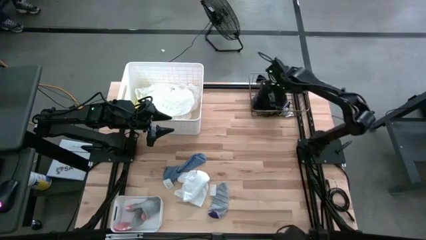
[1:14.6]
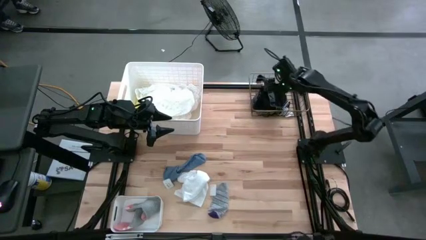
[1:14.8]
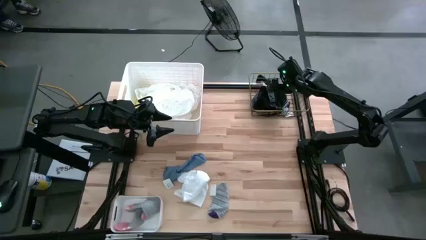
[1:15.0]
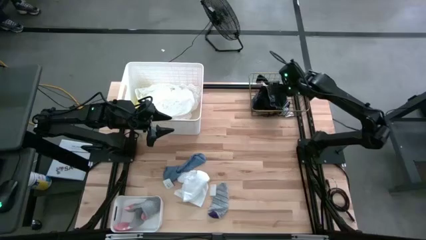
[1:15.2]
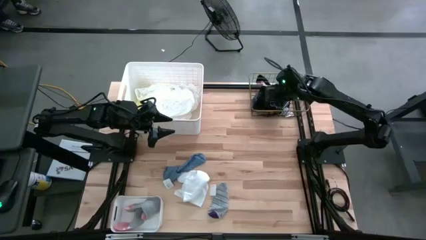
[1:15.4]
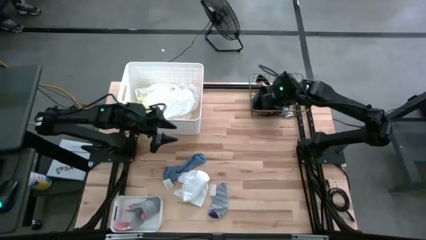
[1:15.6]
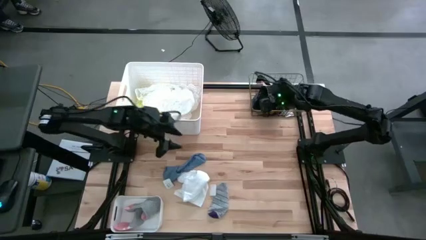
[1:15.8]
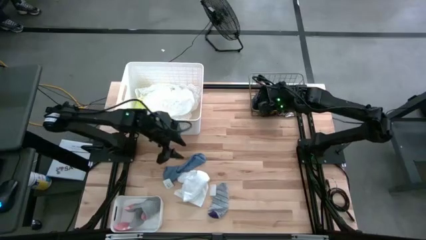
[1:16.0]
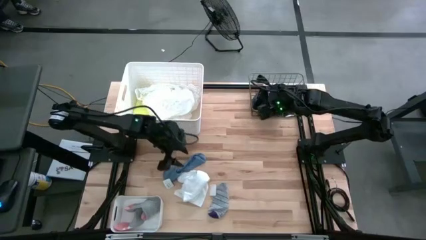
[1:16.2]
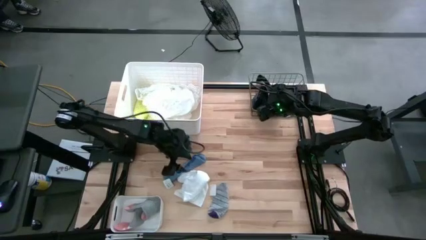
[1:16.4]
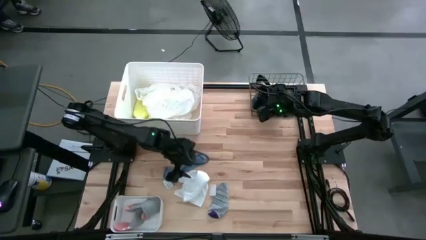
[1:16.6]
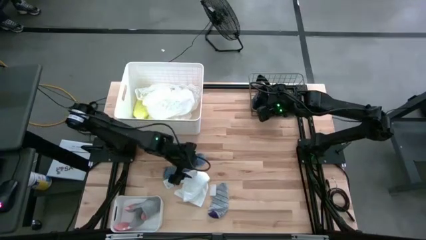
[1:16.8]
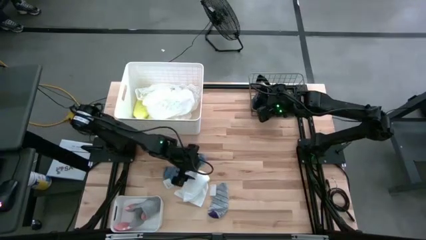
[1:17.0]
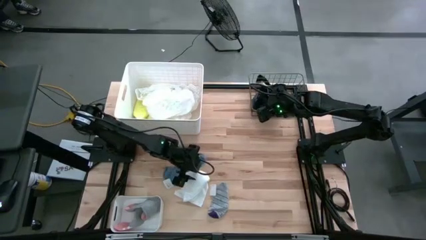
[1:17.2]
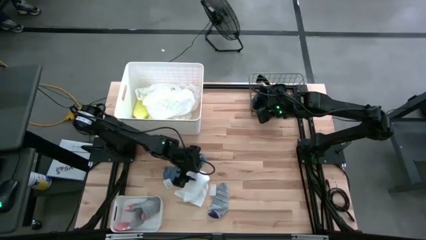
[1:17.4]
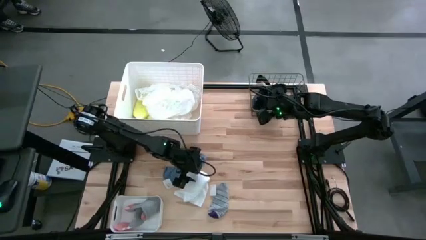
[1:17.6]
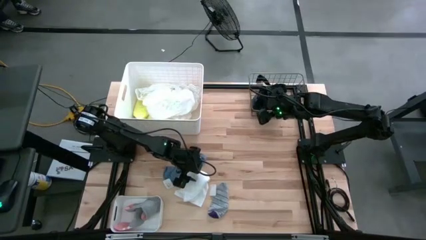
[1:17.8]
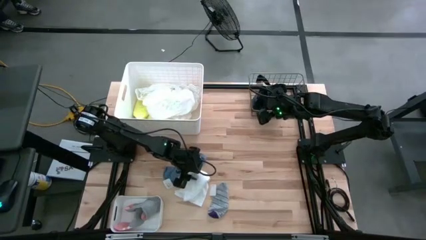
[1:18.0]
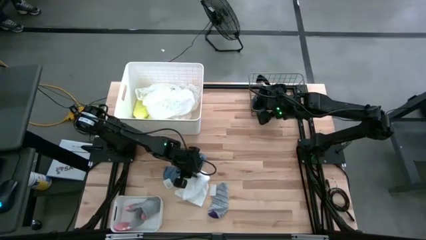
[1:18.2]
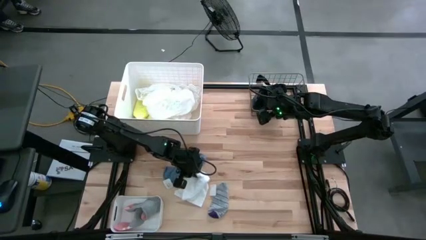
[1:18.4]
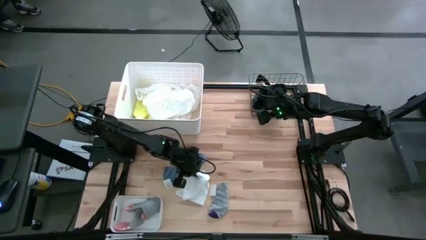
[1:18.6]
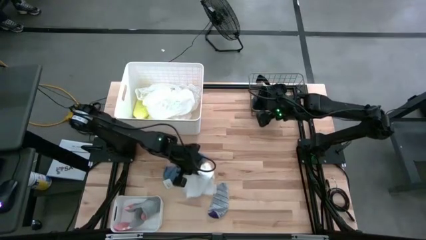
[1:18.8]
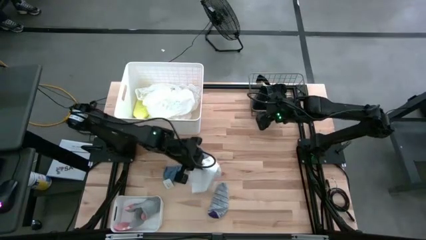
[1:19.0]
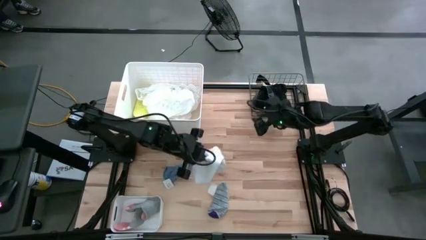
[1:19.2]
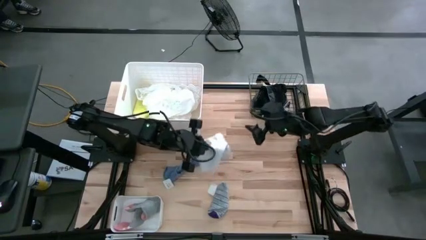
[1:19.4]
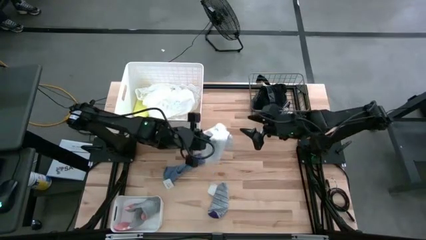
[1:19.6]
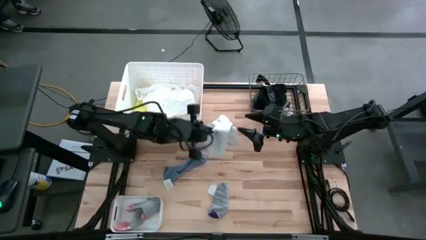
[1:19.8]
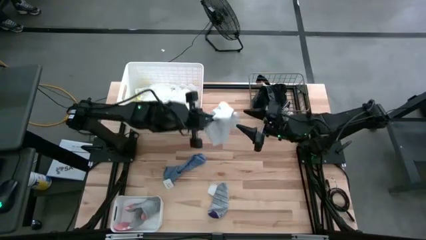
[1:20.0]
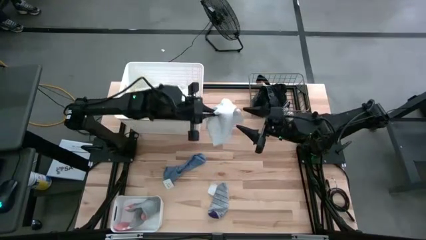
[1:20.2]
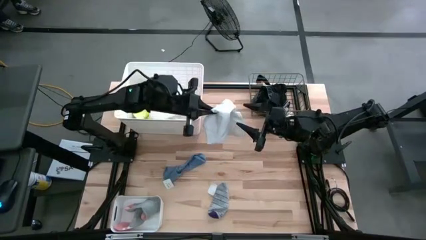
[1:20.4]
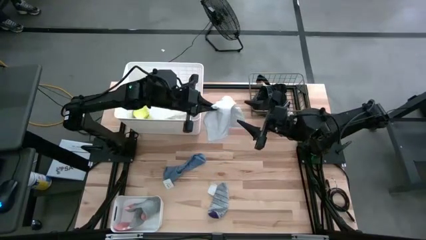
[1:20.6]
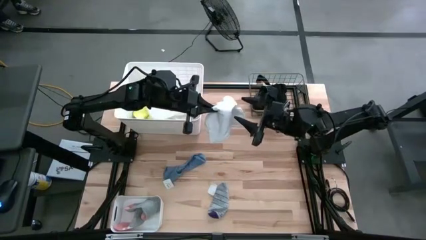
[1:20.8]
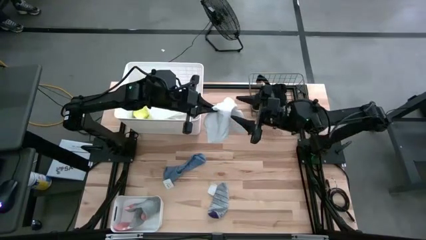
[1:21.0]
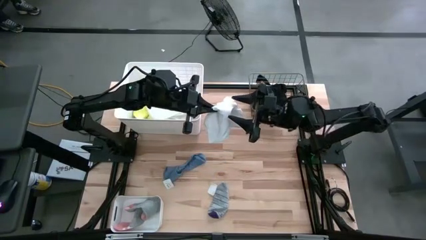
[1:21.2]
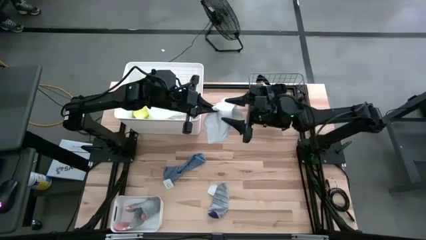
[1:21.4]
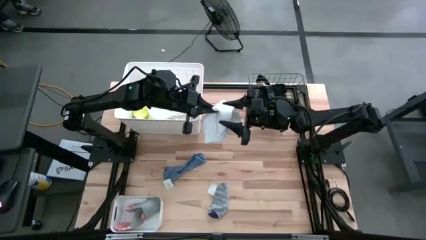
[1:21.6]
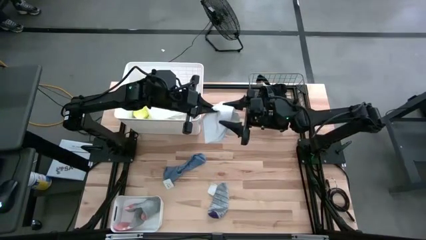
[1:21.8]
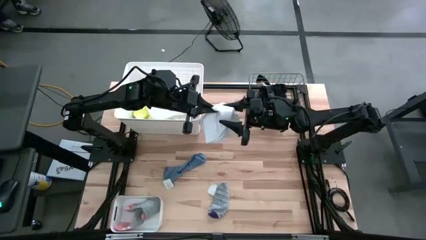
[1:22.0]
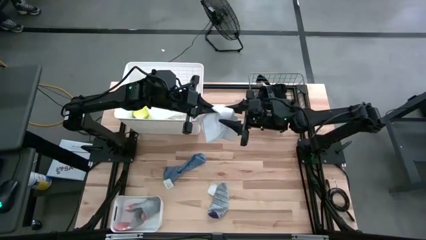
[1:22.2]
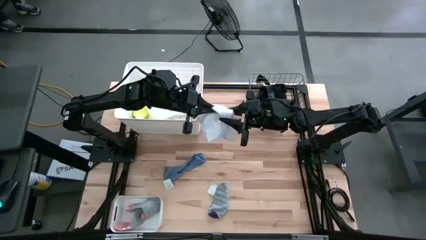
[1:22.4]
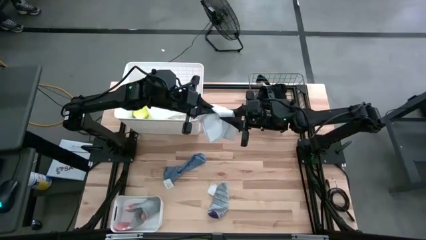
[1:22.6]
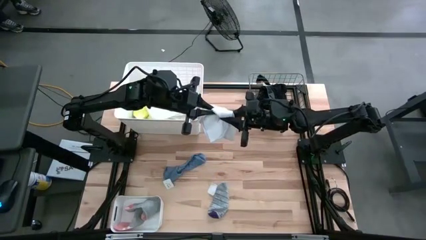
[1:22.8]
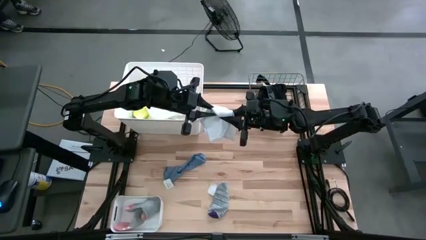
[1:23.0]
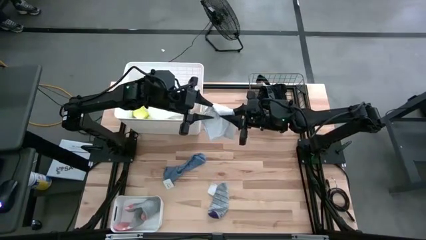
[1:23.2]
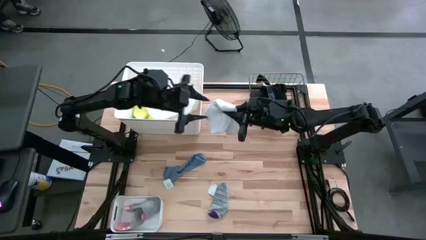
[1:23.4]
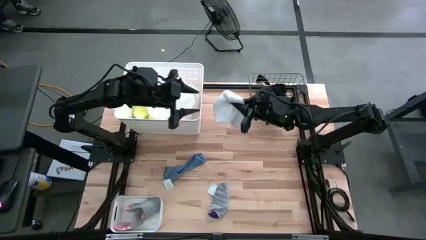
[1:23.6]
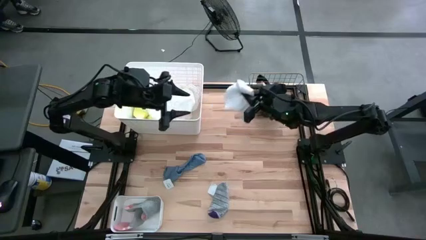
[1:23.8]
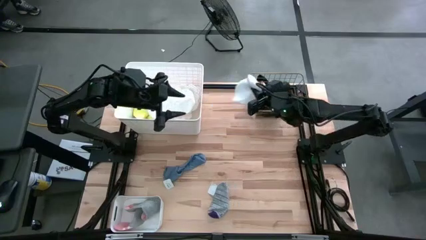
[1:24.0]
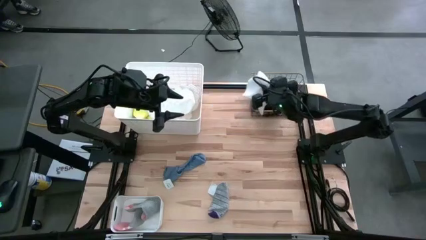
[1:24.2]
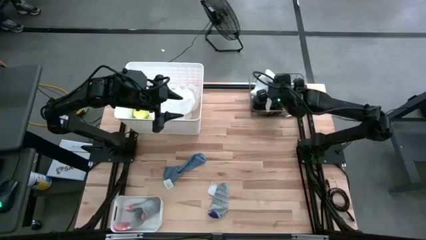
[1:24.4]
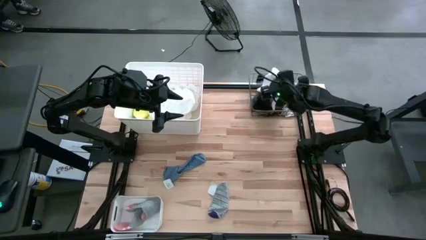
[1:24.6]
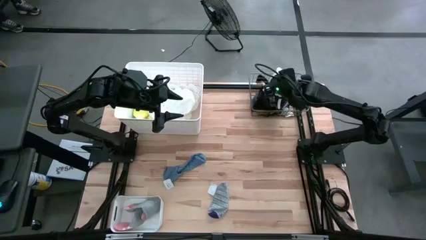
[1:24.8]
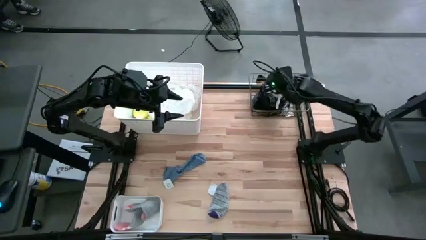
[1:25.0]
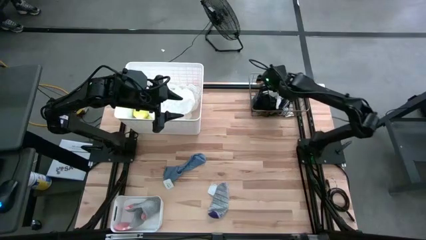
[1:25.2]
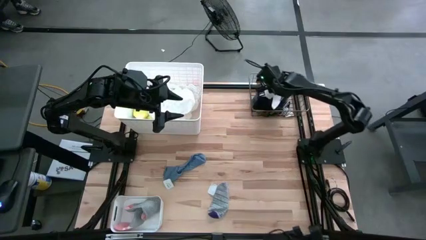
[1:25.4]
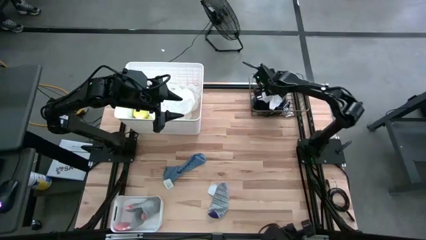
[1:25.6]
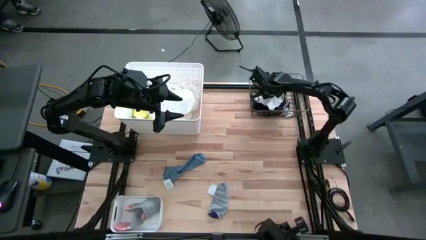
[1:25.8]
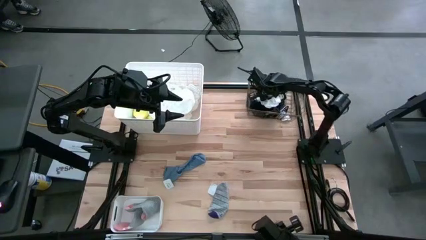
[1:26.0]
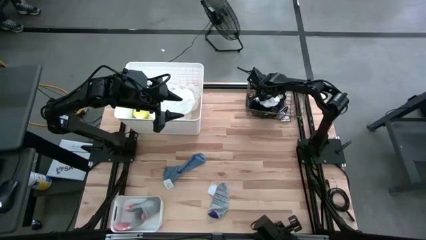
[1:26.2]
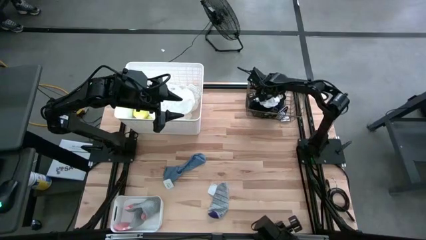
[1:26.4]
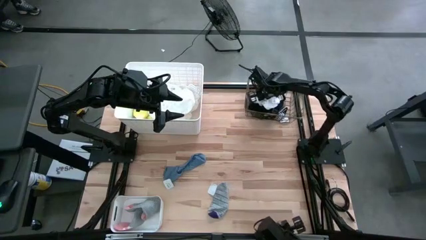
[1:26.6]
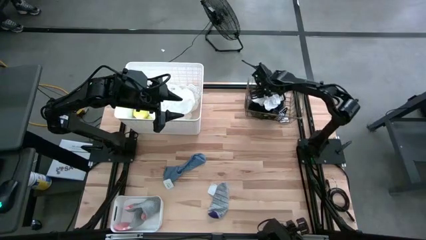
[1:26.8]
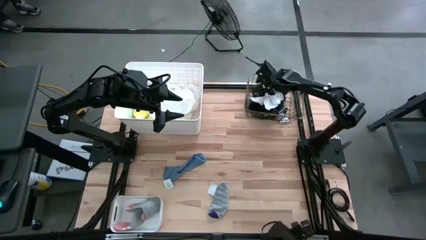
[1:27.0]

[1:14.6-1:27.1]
Task: Pick & Place Cloths
Put the white shorts into the gold wire basket

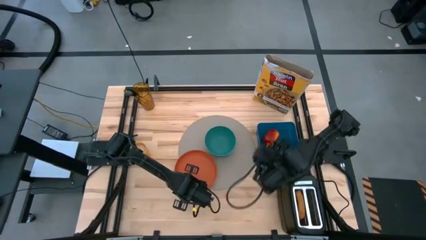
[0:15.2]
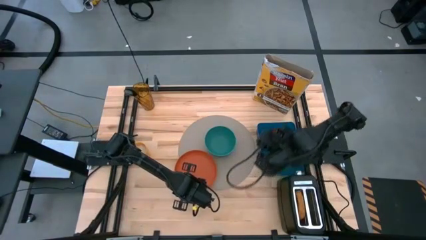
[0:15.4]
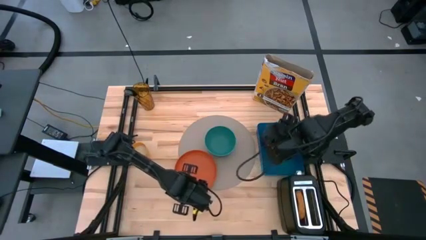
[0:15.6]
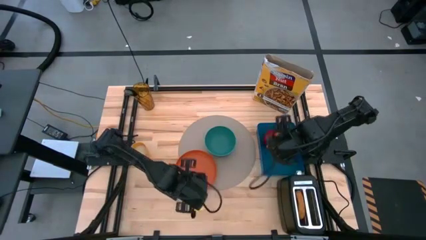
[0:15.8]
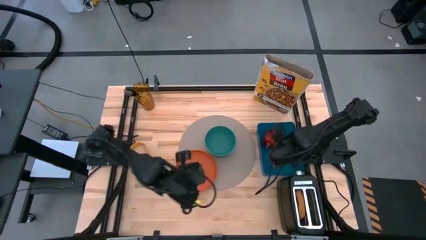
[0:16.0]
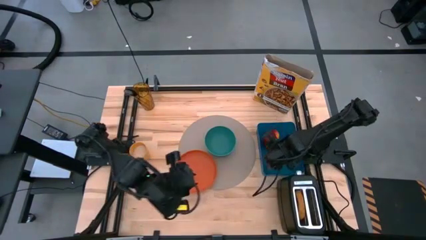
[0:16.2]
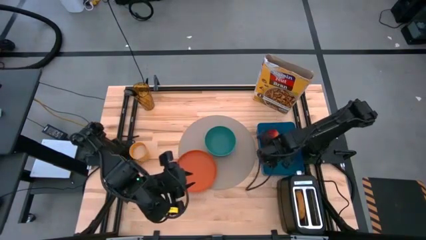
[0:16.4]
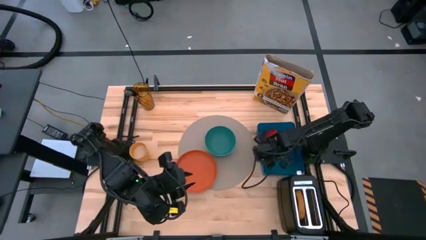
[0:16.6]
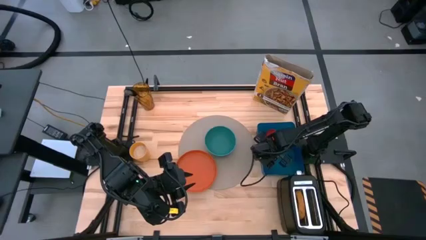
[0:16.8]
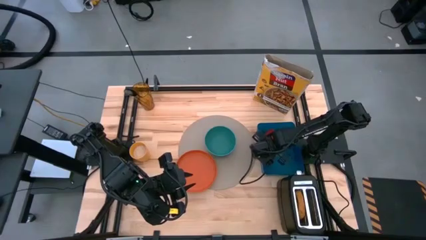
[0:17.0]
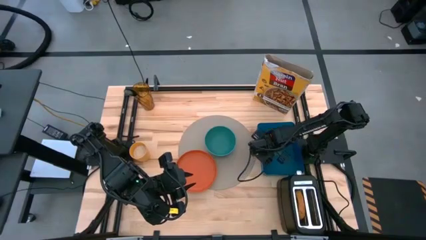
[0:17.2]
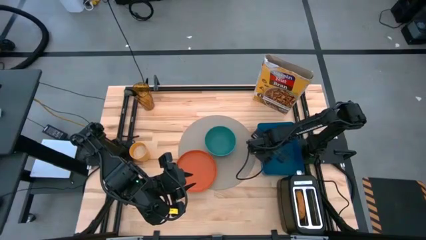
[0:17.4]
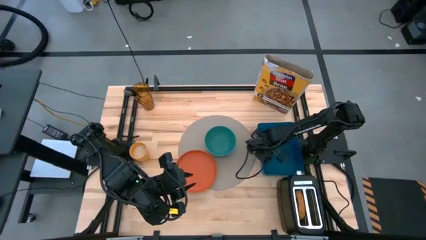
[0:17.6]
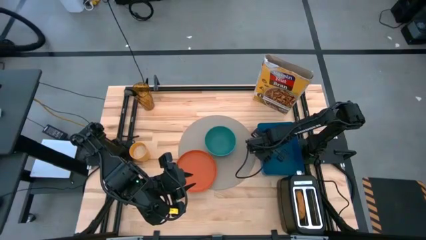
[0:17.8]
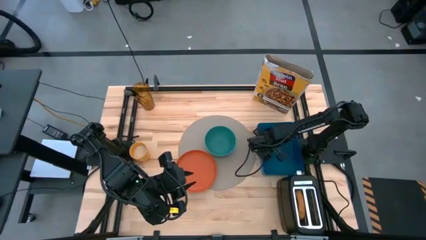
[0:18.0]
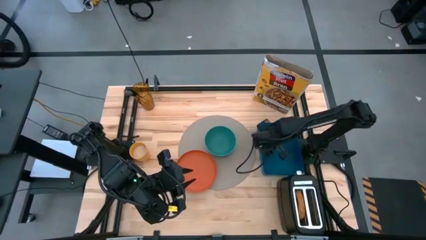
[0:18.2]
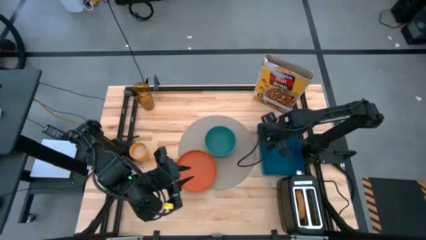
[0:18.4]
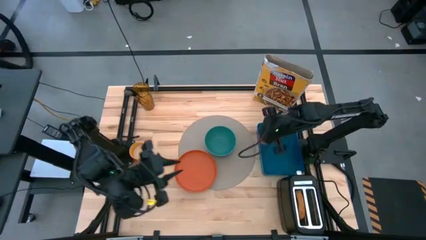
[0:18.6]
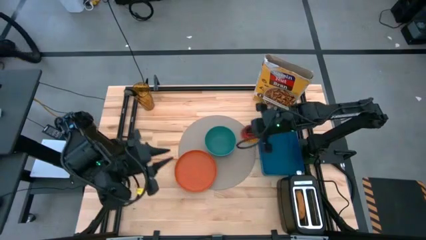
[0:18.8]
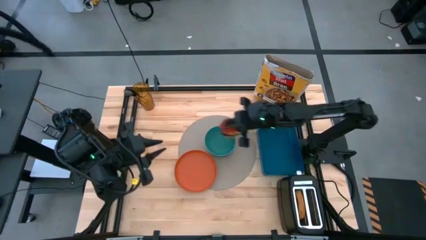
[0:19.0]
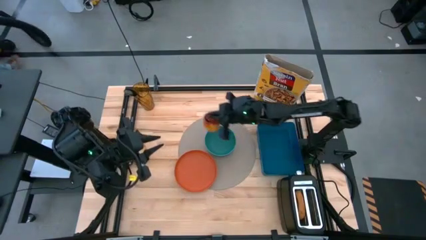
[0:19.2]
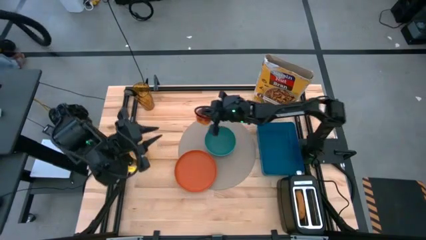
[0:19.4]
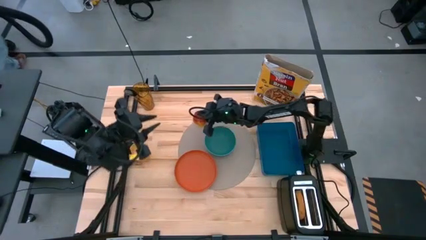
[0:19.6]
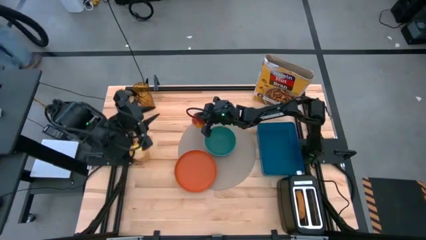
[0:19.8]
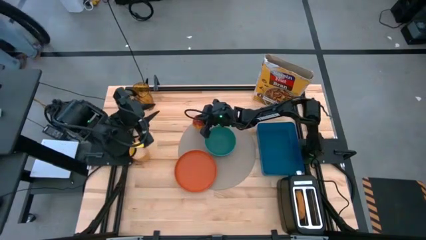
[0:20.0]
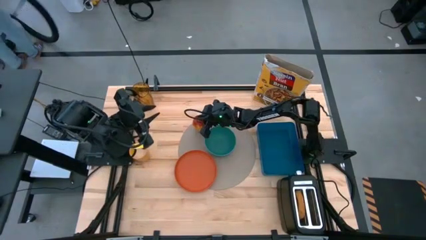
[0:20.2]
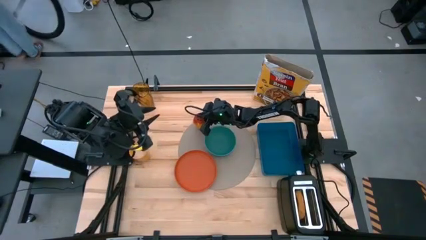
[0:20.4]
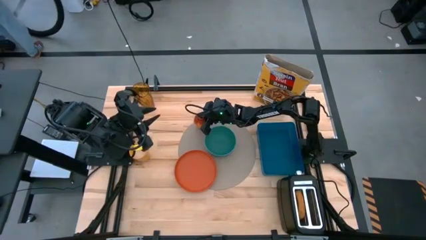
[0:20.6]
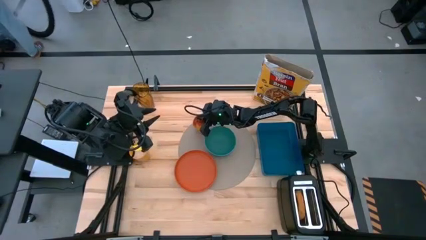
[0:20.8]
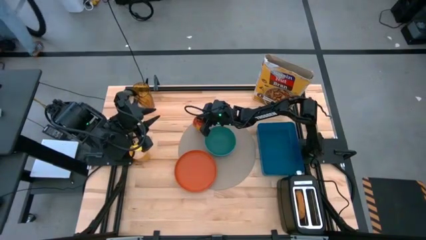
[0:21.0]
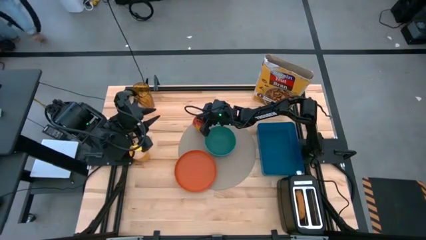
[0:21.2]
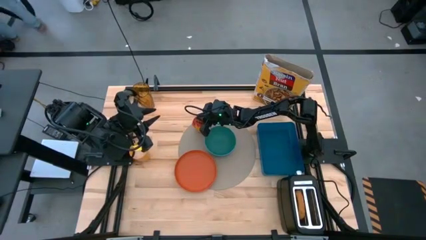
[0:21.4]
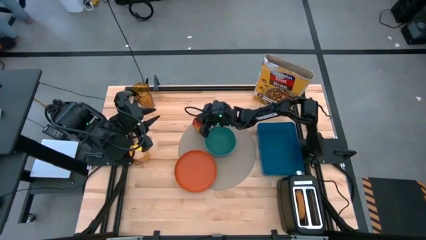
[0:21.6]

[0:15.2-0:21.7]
Task: Arrange a breakfast setting
Put the red apple to the top left of the green bowl on the brown table mat
